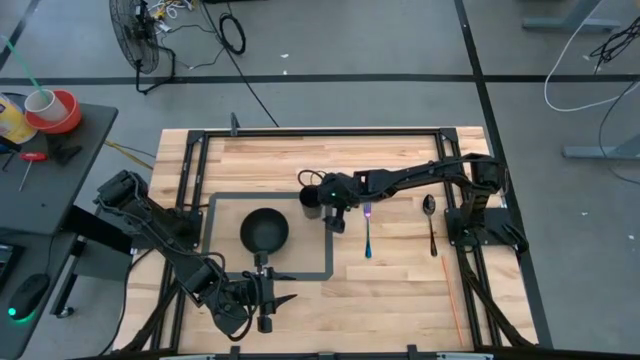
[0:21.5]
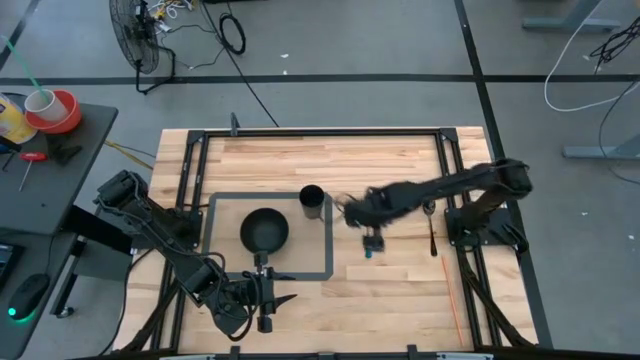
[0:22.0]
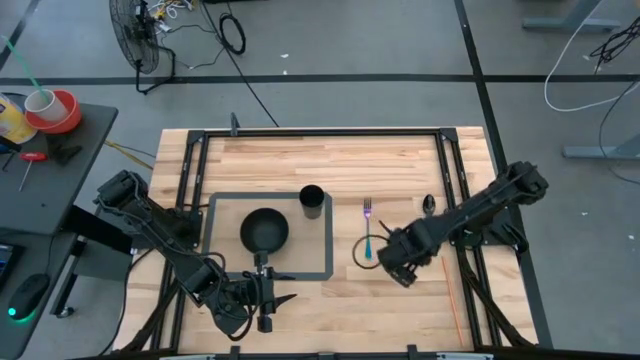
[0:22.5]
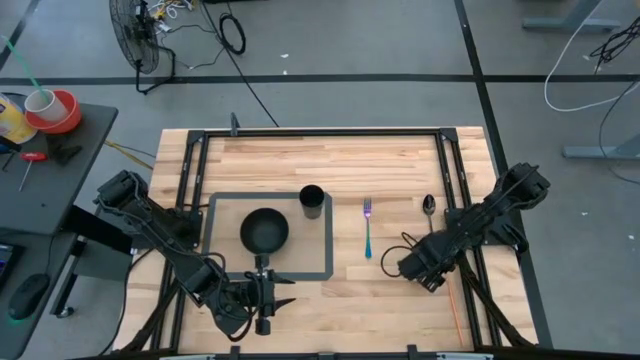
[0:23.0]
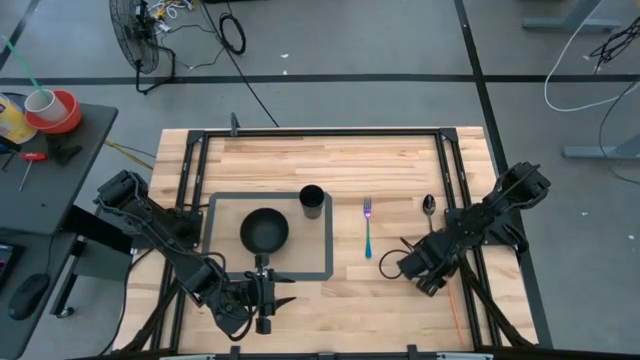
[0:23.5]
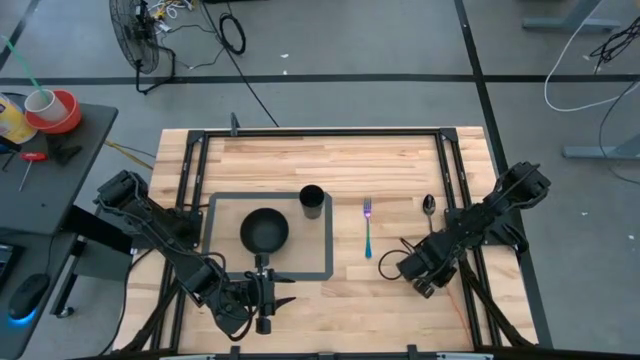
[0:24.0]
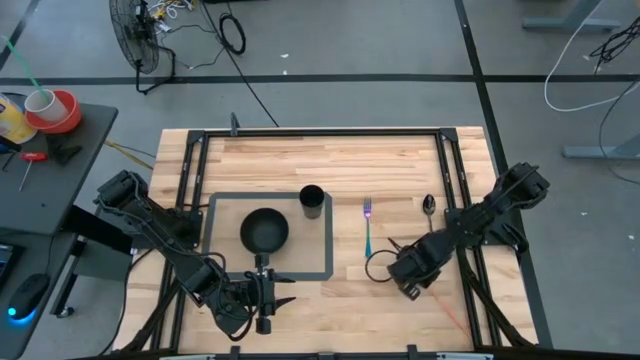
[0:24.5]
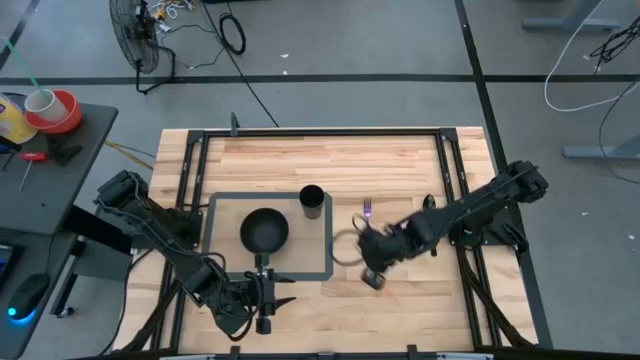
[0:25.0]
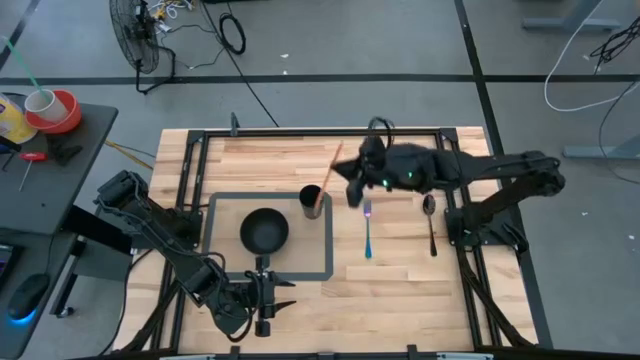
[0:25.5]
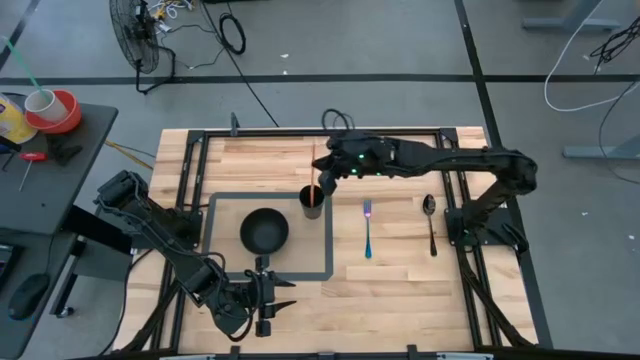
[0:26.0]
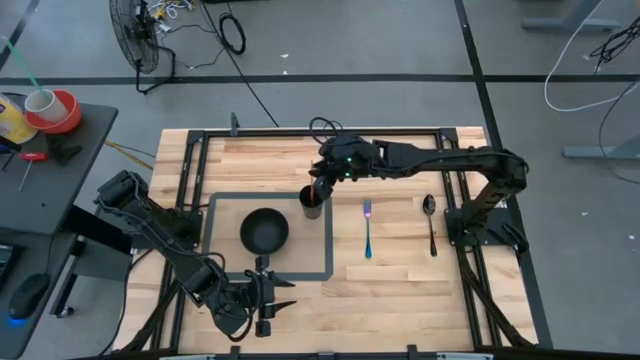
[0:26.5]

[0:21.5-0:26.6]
Task: Pick & Place Utensil
Put the straw into the black cup on the table mat

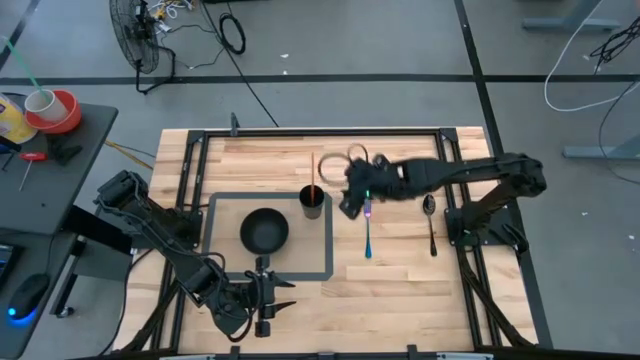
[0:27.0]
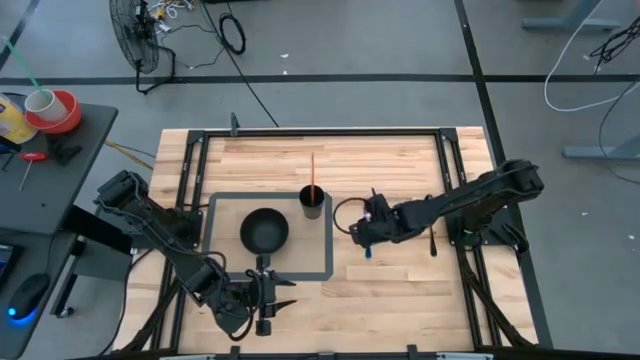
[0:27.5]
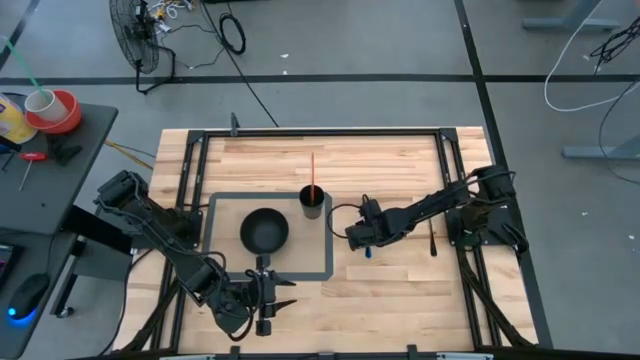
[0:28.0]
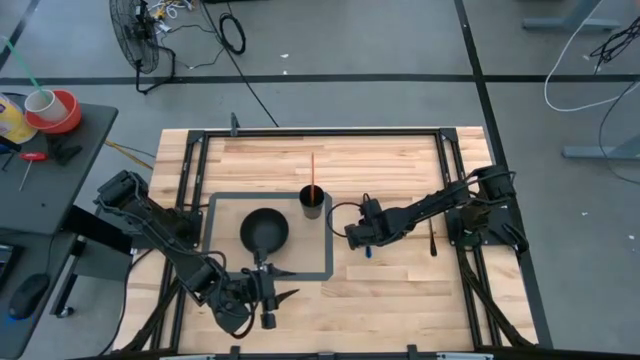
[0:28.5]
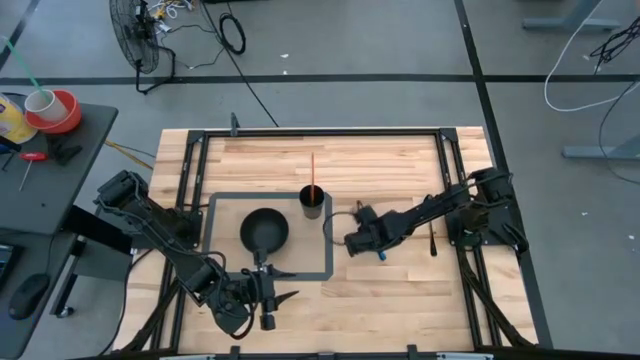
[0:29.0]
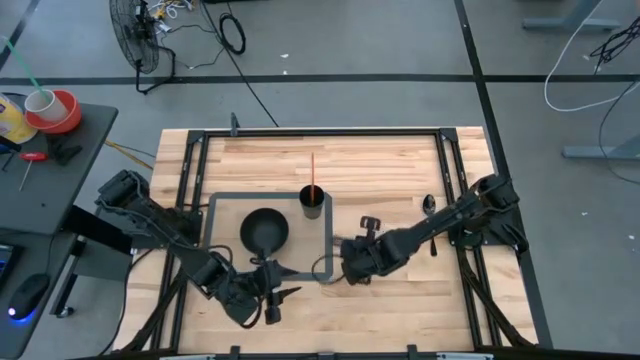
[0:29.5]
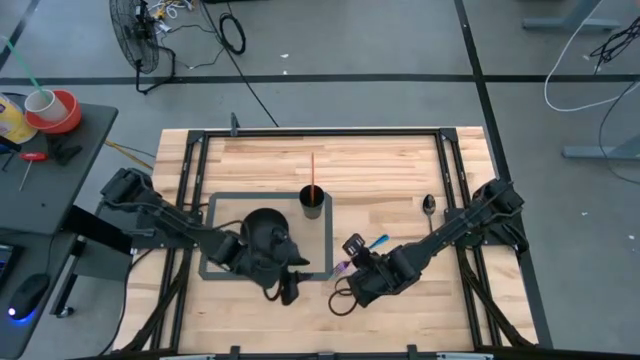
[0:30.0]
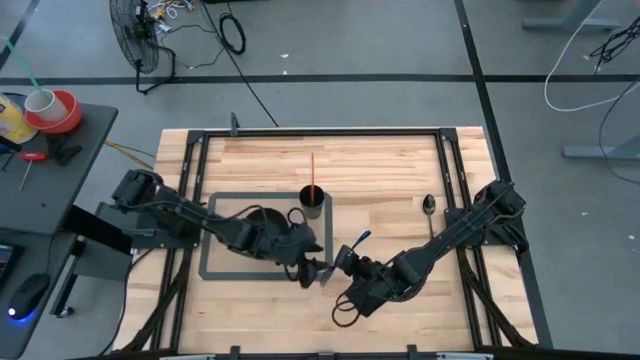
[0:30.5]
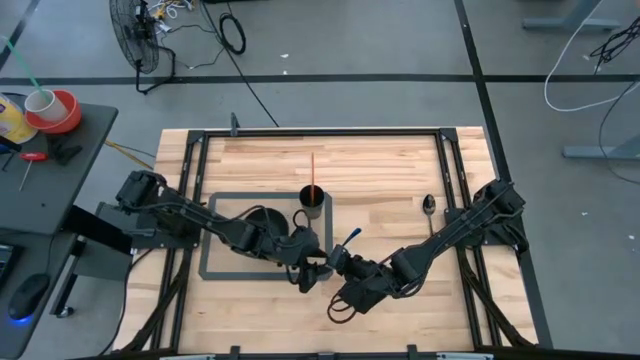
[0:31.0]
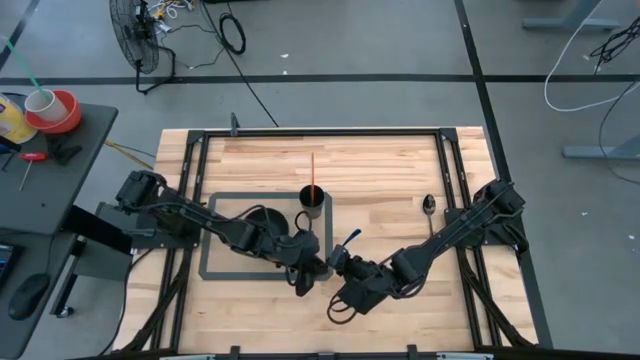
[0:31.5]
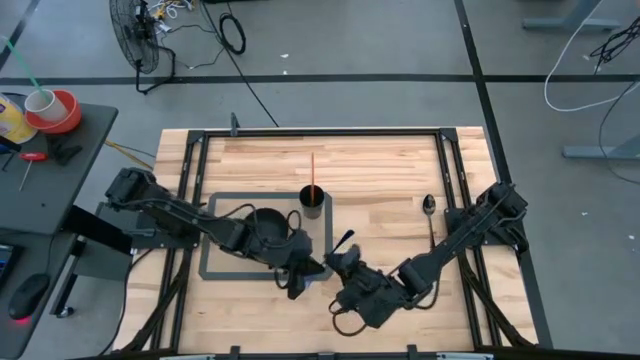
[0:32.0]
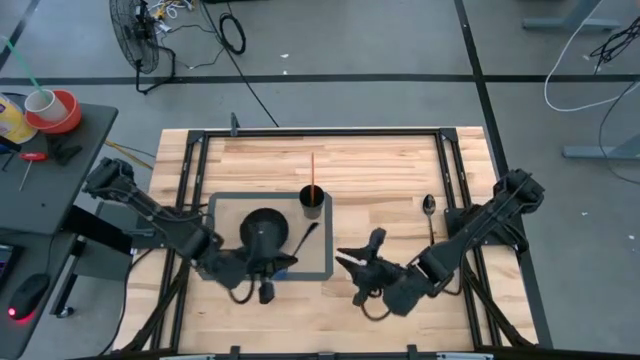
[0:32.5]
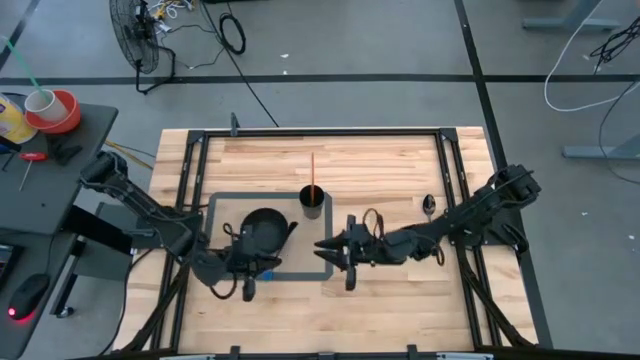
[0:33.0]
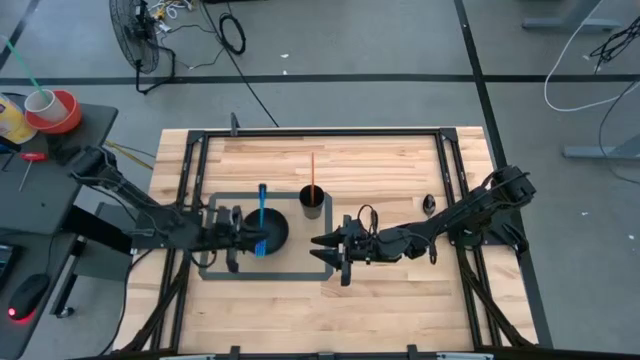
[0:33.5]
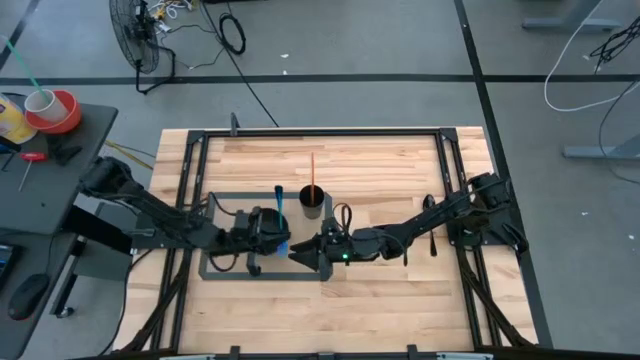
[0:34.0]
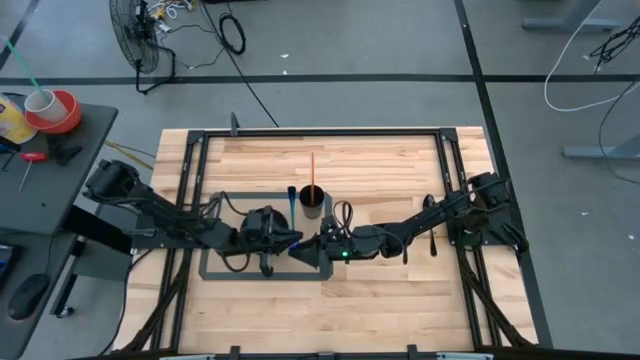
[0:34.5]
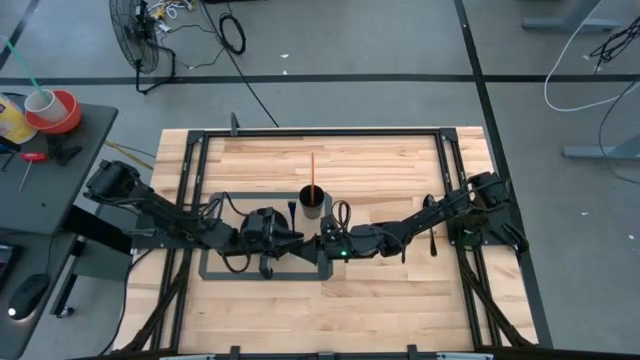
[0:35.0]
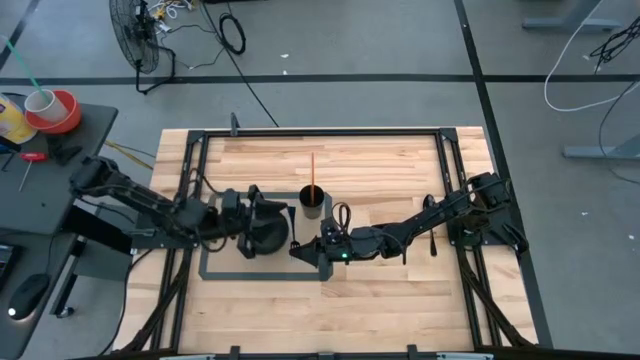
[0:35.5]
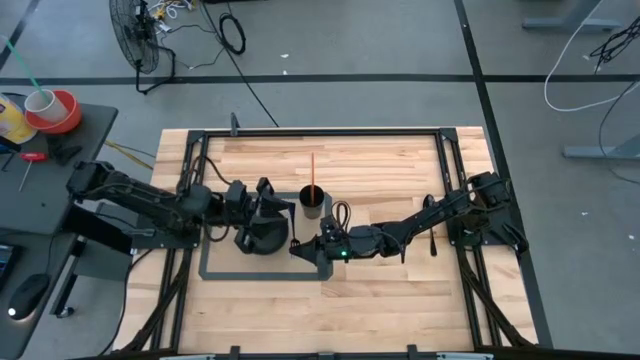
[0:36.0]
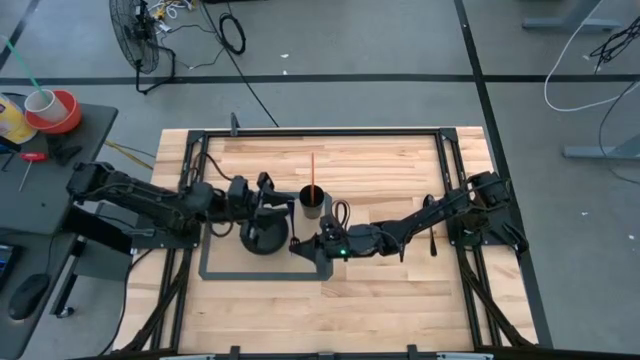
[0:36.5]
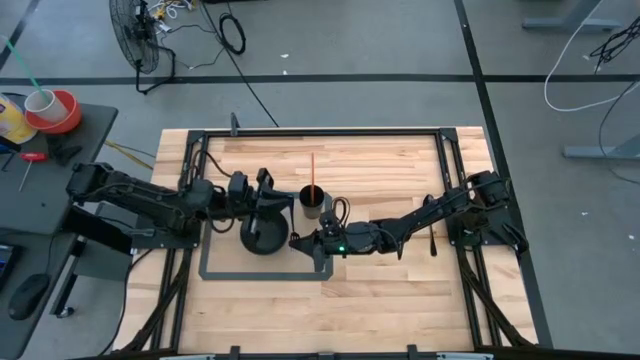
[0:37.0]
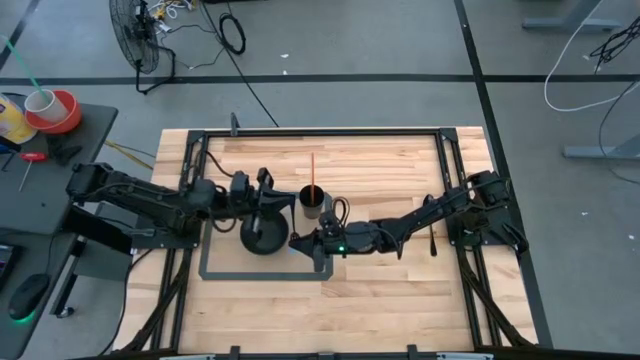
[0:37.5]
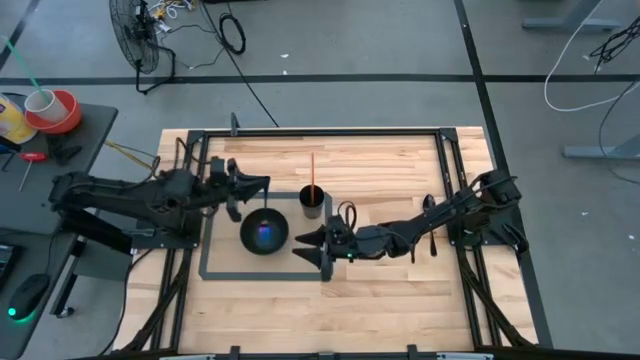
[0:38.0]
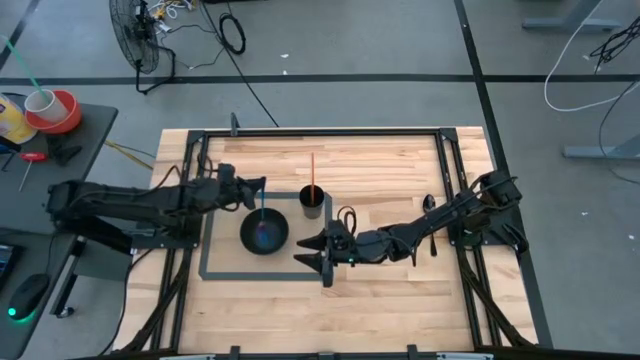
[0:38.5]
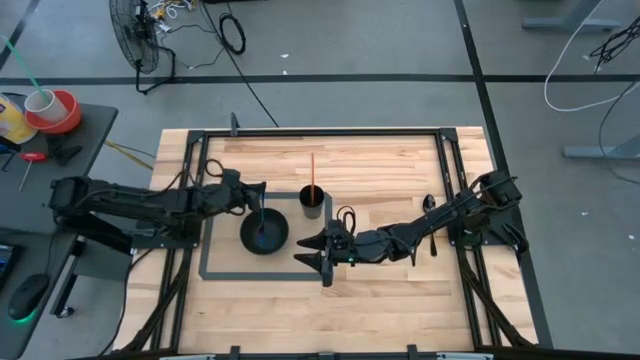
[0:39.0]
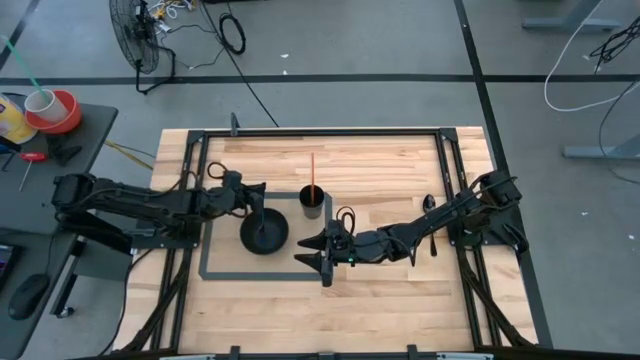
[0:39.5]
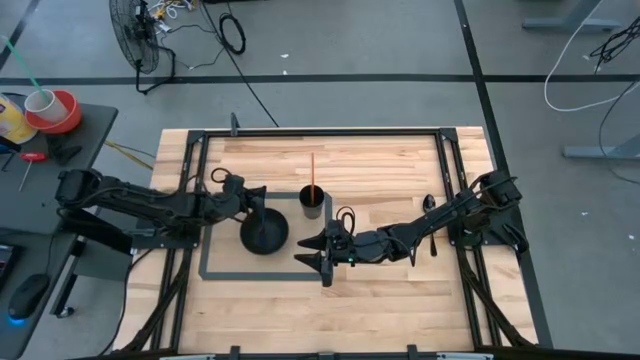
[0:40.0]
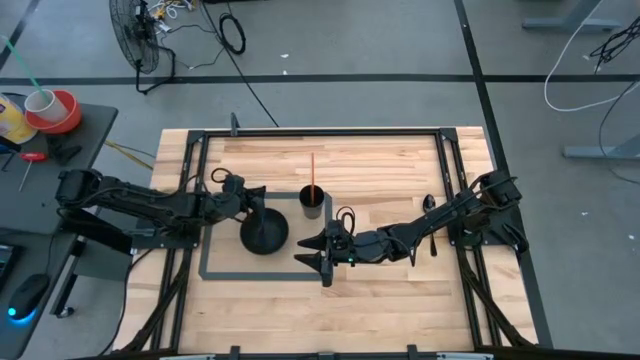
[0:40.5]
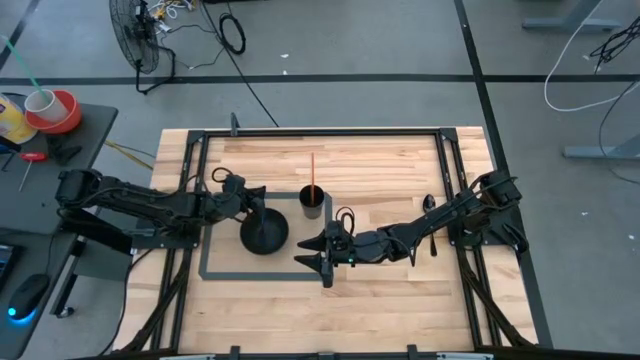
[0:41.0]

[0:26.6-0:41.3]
Put the fork into the black bowl on the table mat

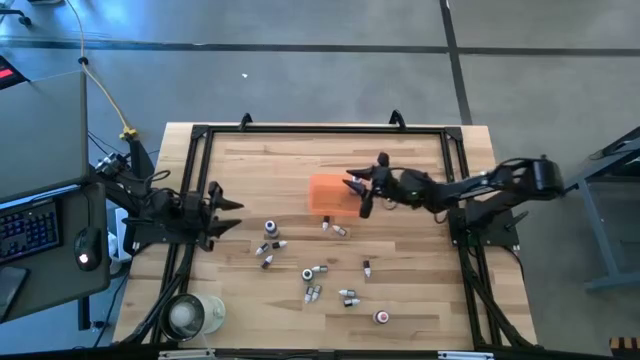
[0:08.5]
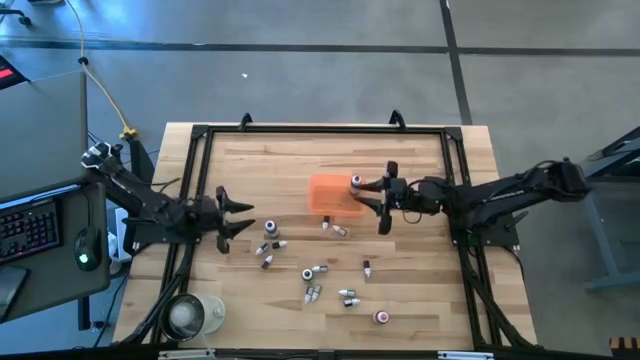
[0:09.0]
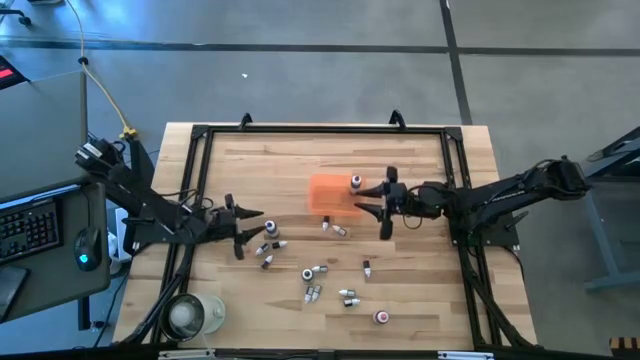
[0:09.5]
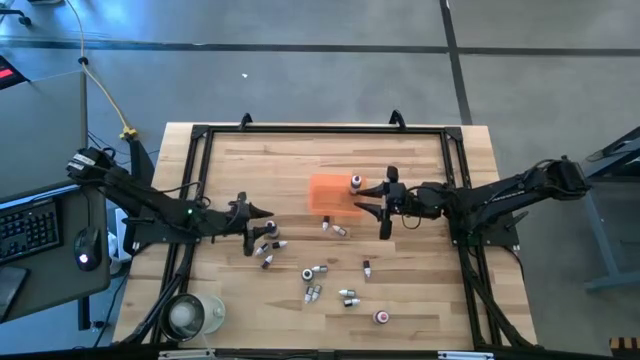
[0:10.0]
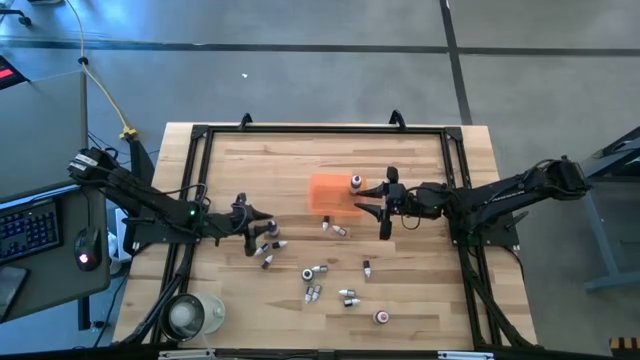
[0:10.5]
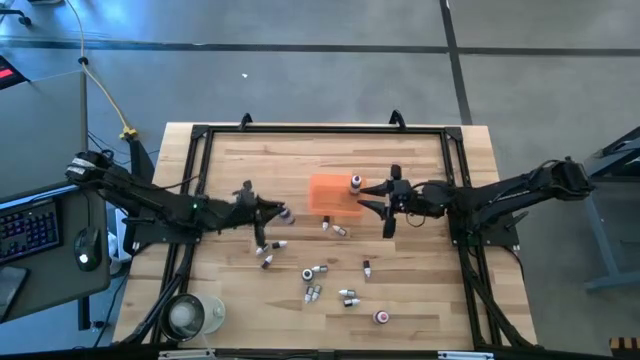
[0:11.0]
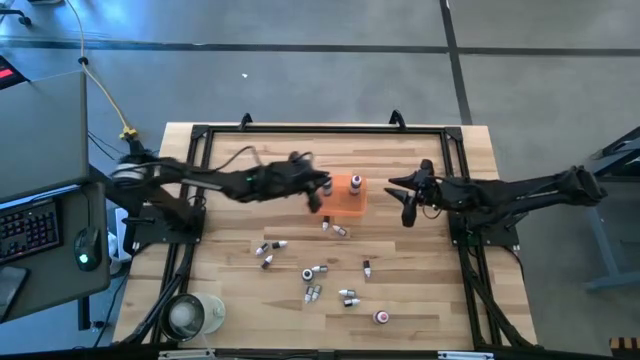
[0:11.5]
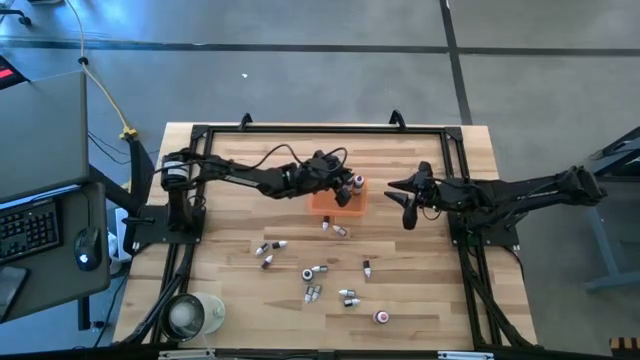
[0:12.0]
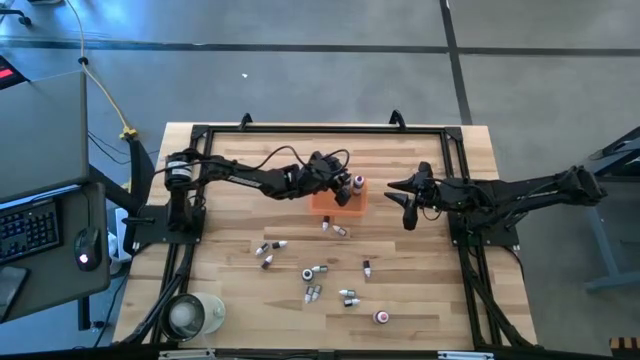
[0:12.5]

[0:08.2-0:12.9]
Task: Pick & Place food coloring
Put the large blue food coloring bottle into the orange bin
